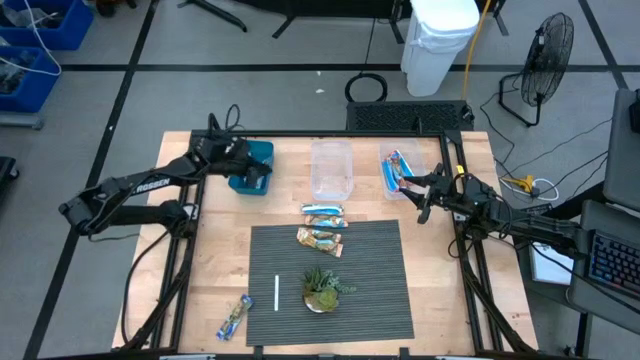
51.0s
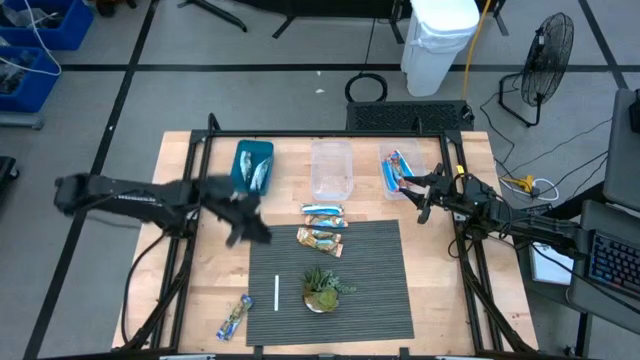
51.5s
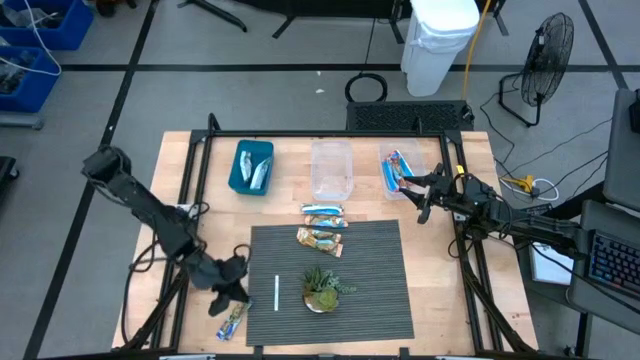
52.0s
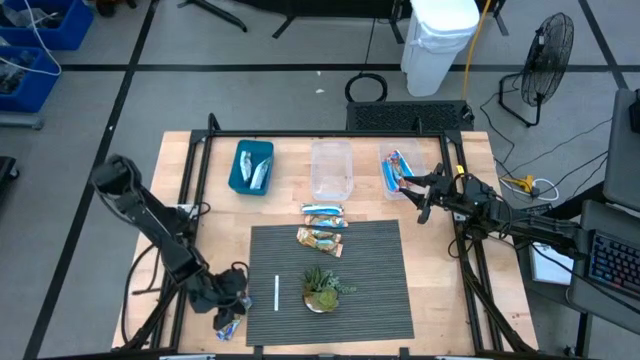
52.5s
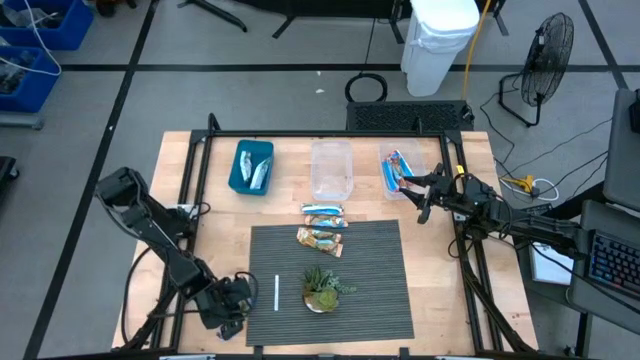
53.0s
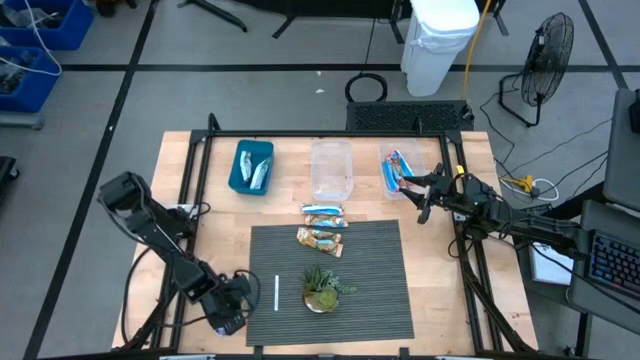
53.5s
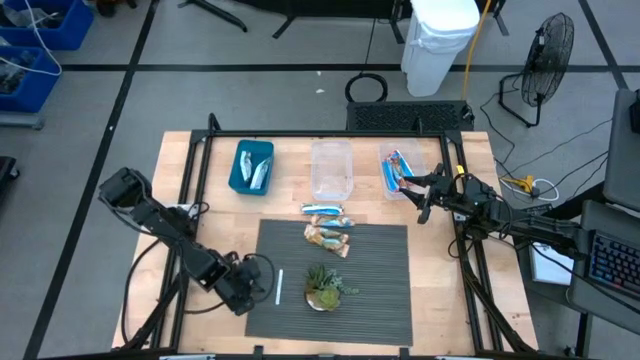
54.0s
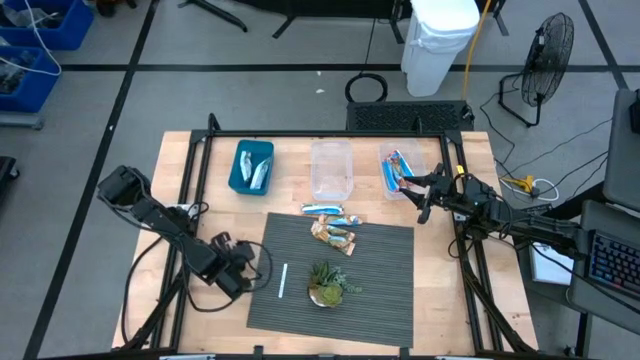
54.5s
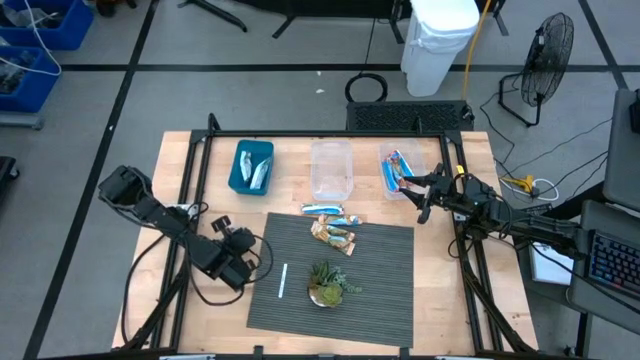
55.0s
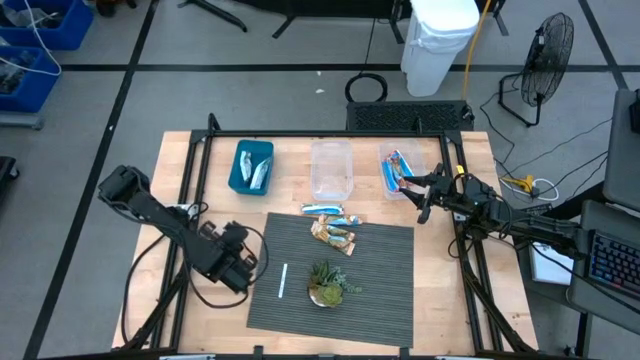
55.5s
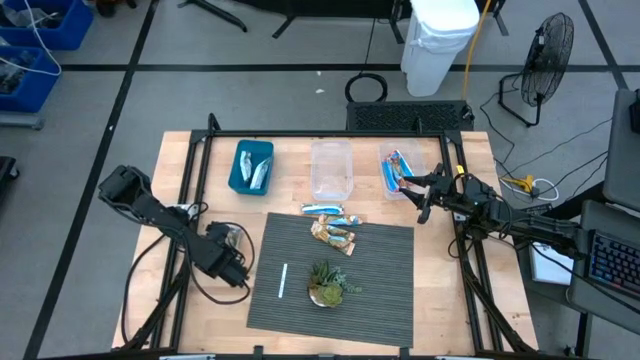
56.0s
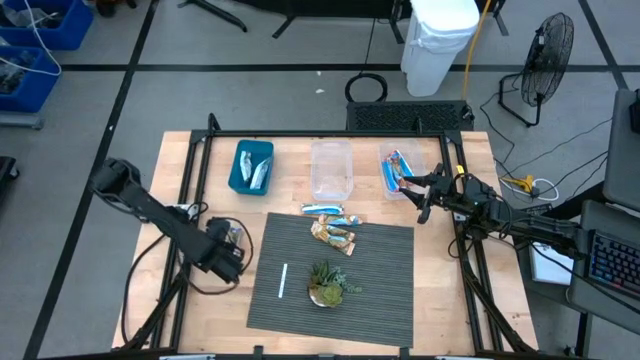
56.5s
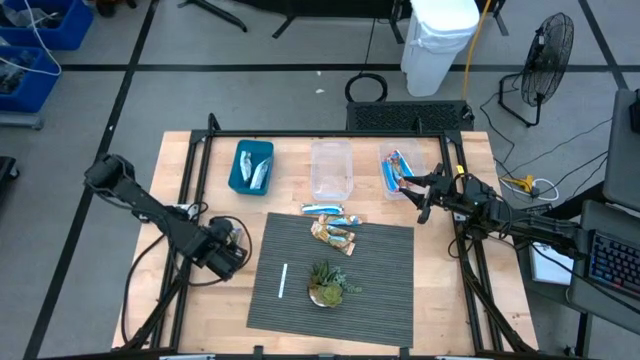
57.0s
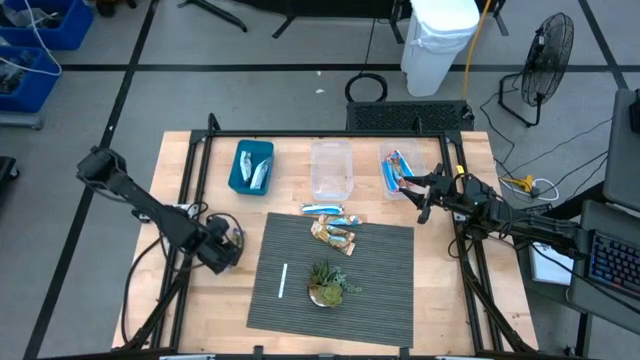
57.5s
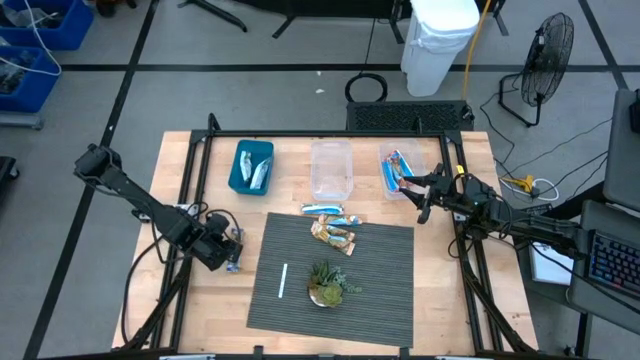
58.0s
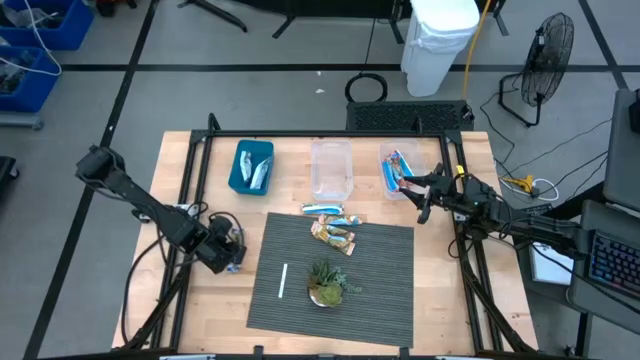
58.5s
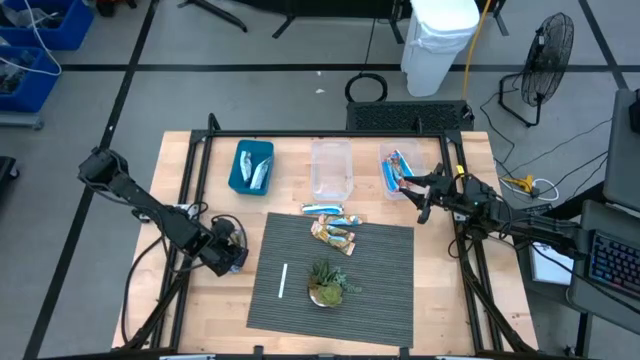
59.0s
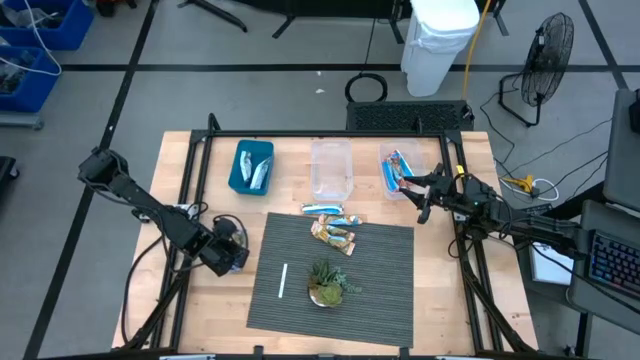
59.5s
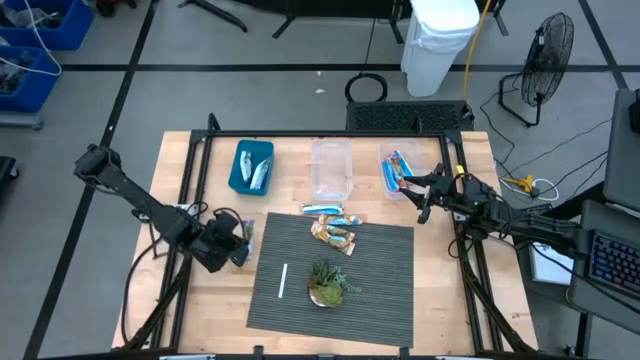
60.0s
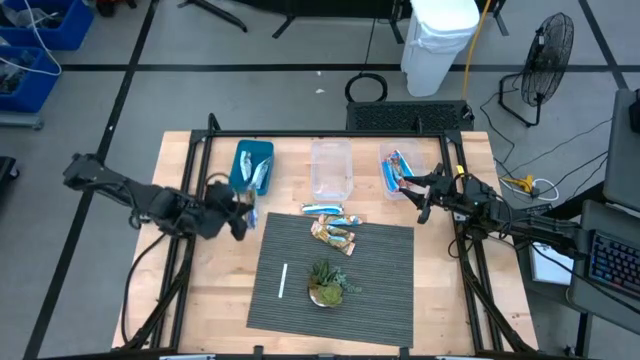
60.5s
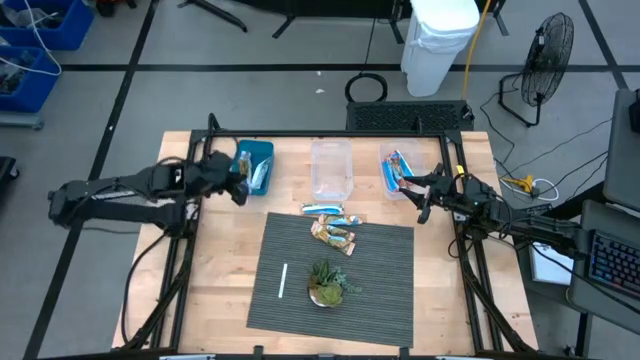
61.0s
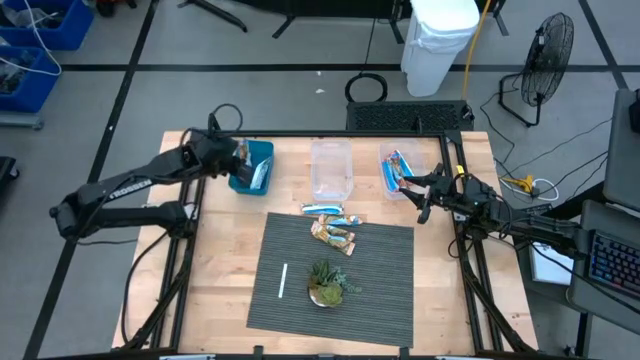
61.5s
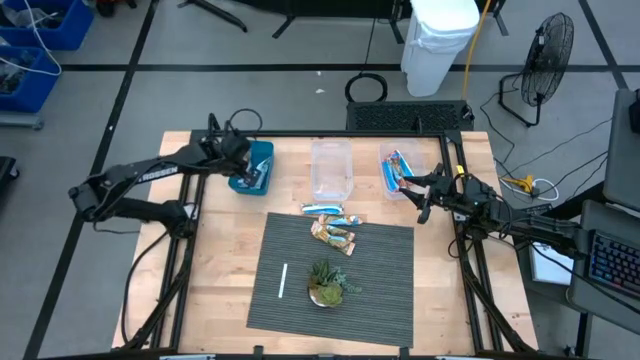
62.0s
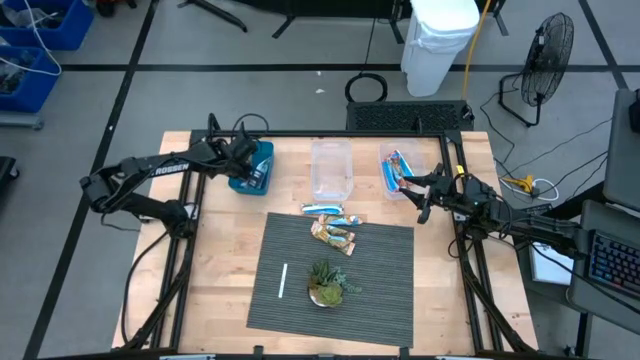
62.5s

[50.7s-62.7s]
Task: Pick and place Granola Bars by type
Put the green granola bar into the blue bin

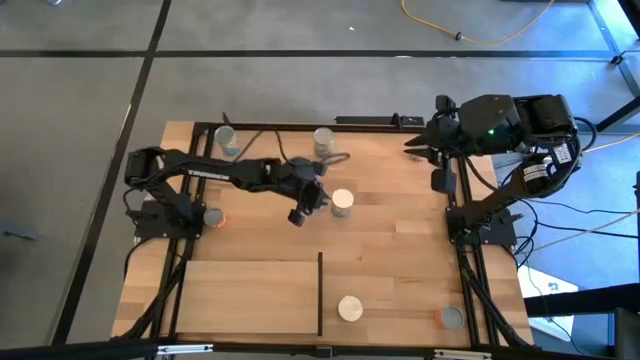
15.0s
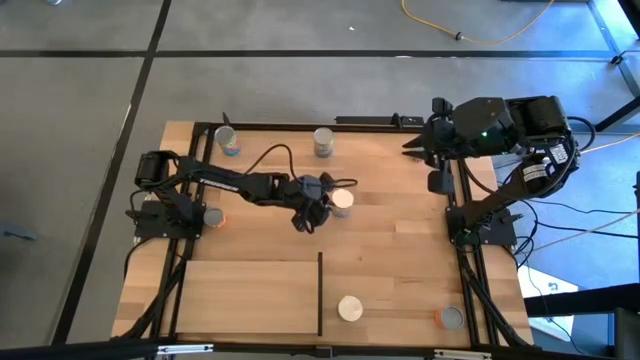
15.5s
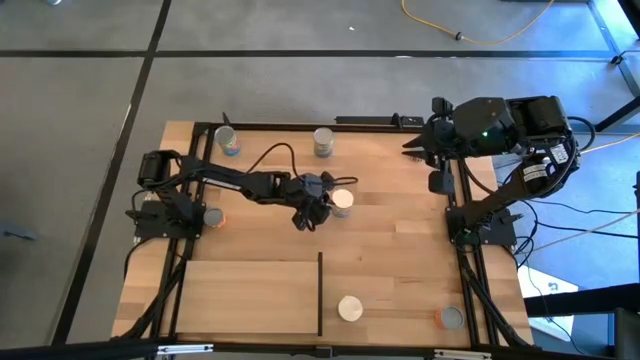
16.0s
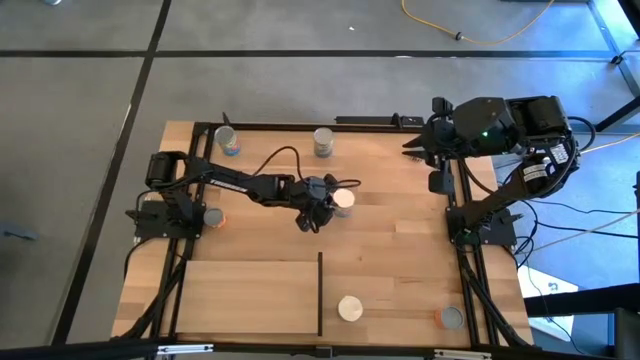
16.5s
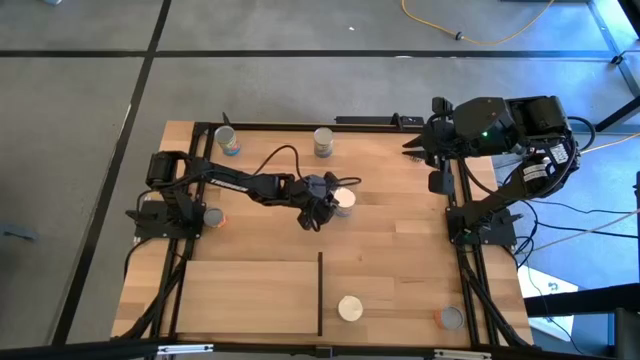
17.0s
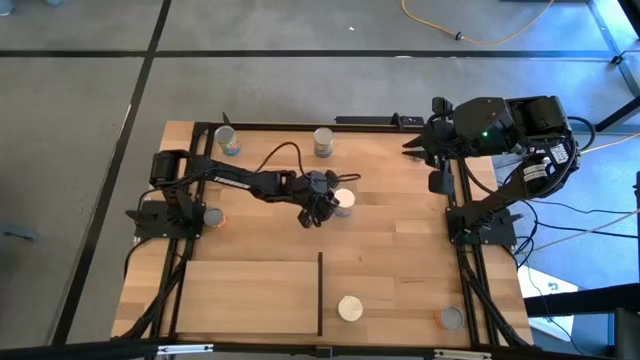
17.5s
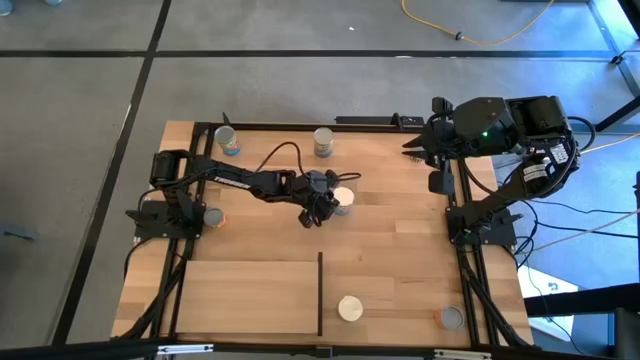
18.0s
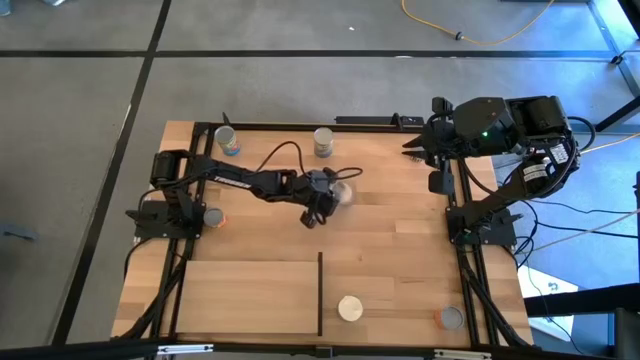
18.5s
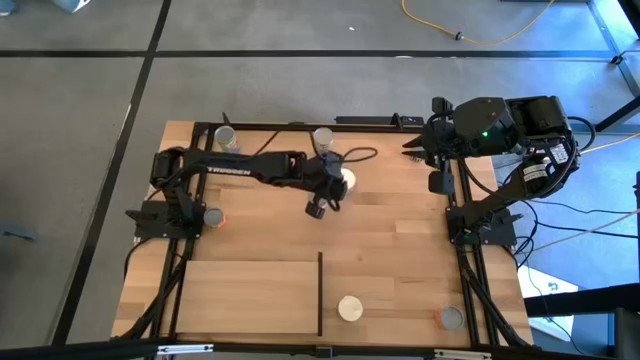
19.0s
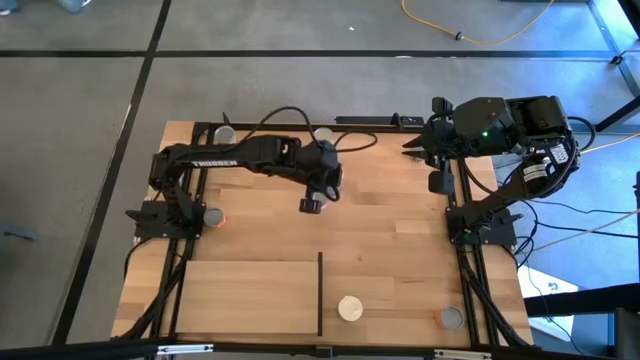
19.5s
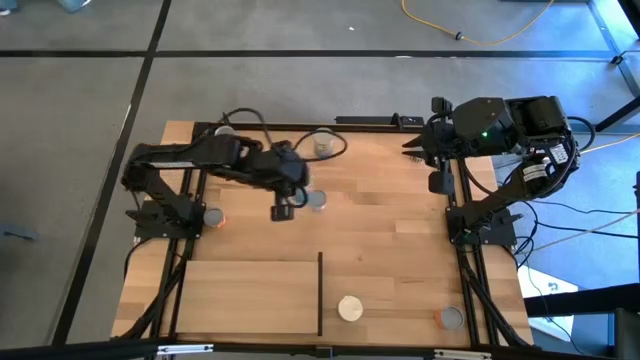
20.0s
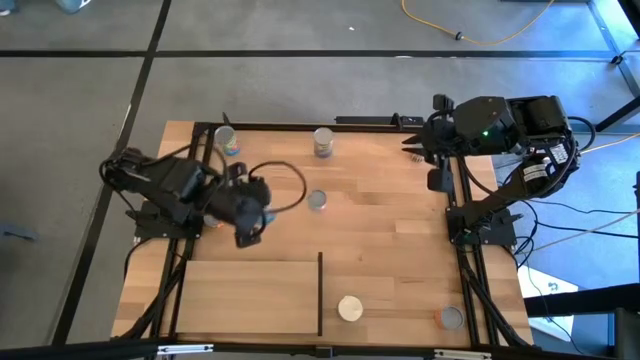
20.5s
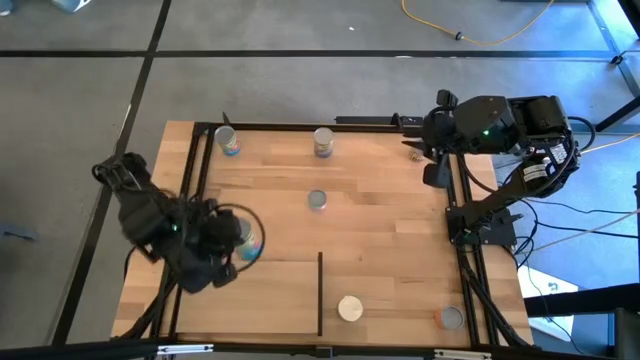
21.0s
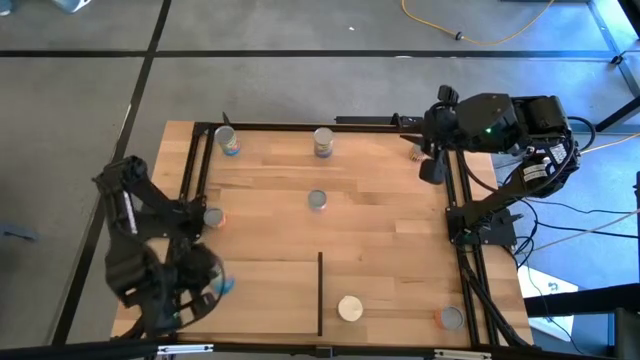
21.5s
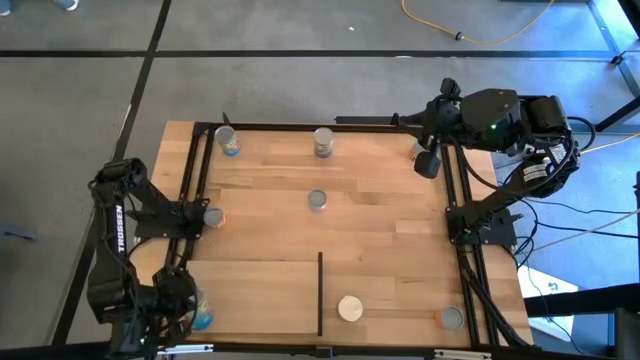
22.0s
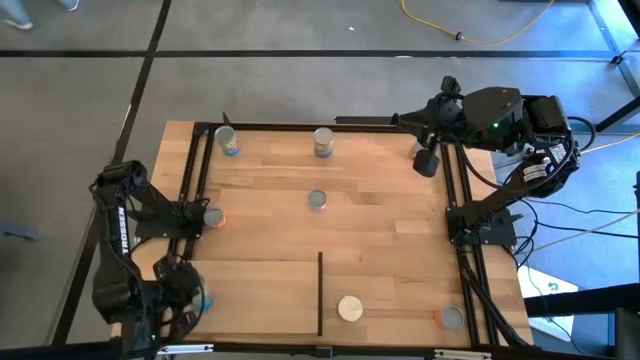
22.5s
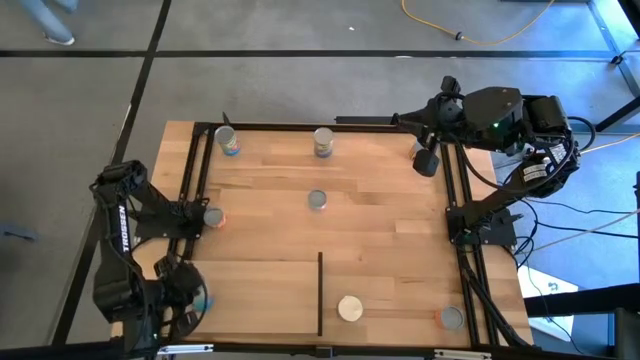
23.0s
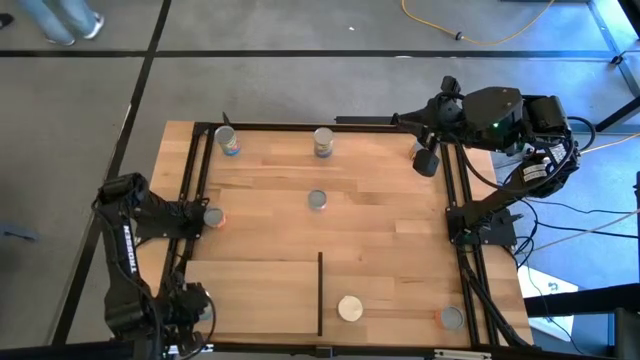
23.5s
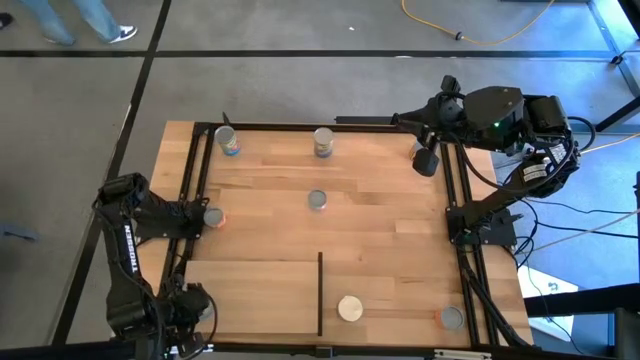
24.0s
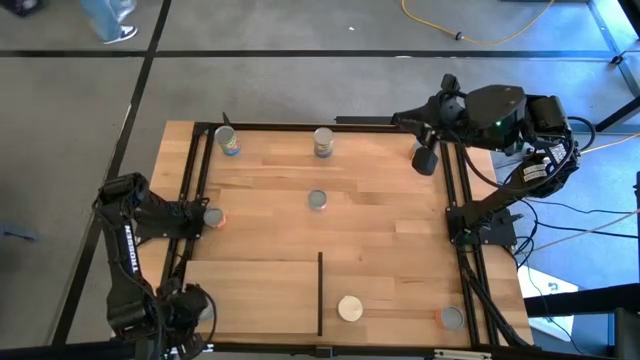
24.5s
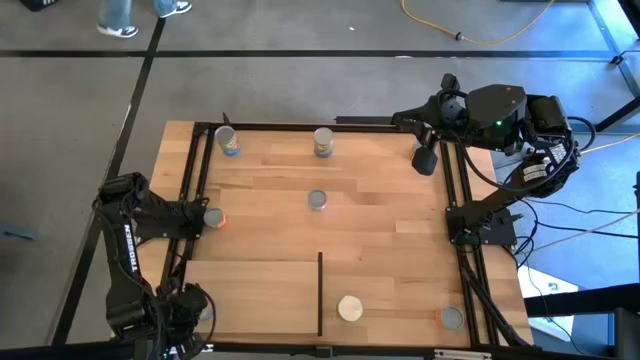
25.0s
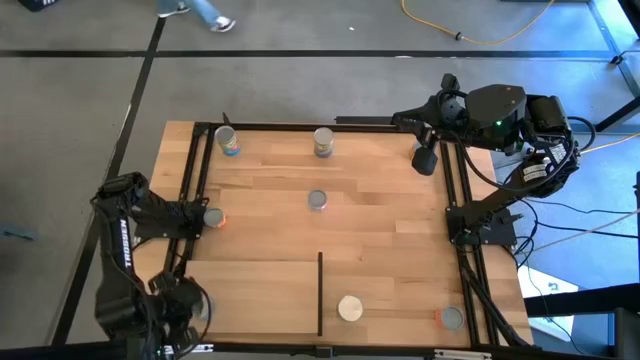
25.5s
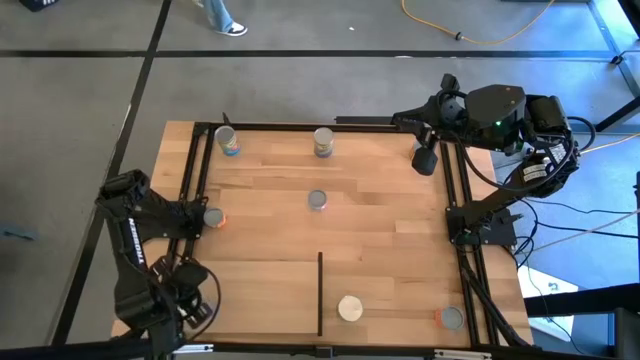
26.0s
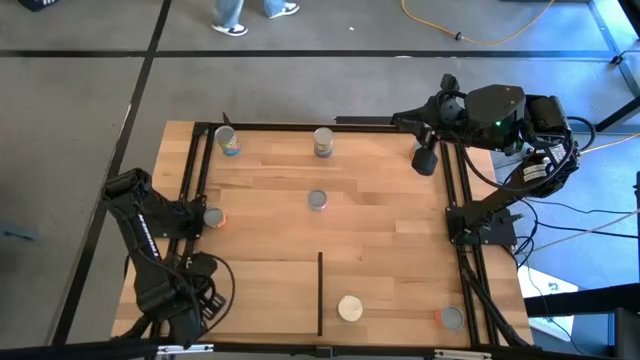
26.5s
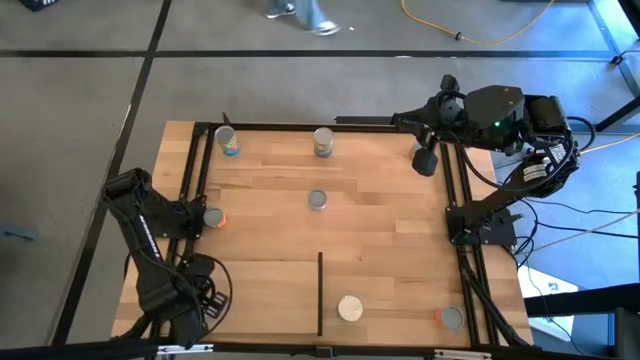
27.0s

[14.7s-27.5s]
Task: Pick and place cans onto a shelf
Put the canned tomatoes on the shelf
